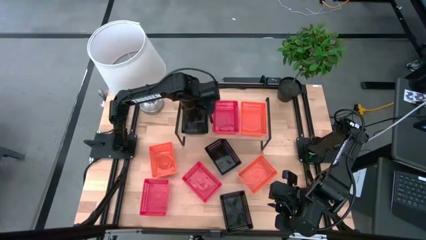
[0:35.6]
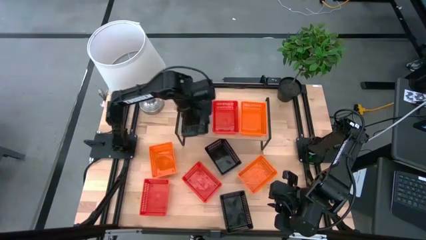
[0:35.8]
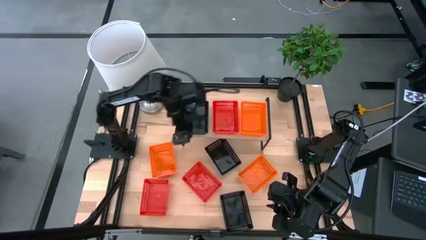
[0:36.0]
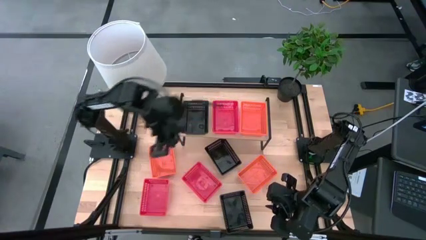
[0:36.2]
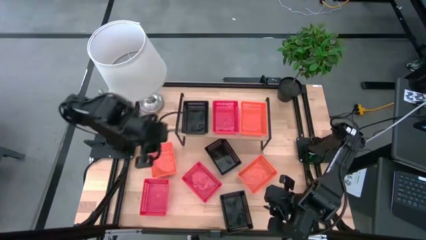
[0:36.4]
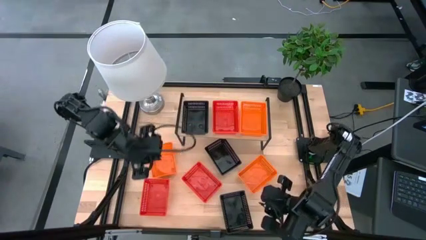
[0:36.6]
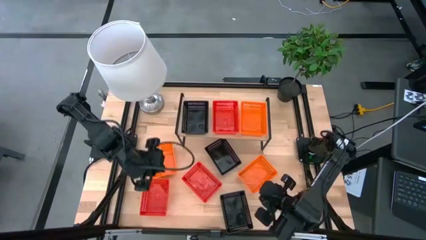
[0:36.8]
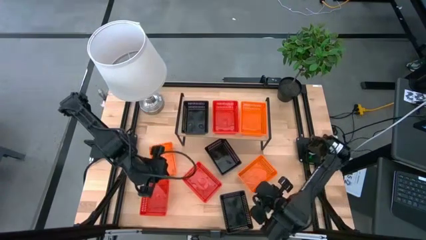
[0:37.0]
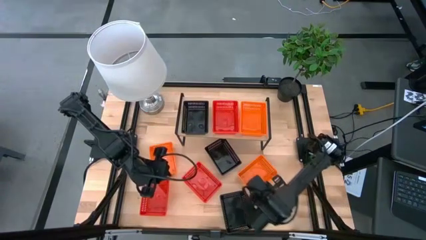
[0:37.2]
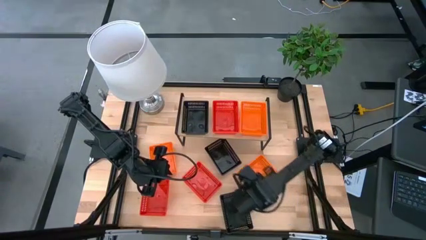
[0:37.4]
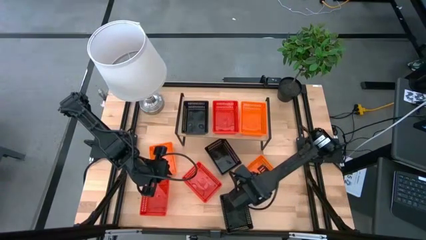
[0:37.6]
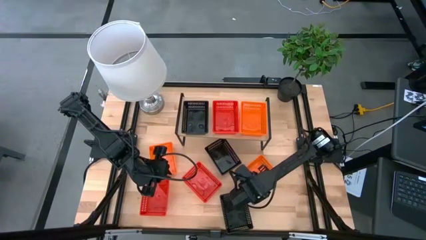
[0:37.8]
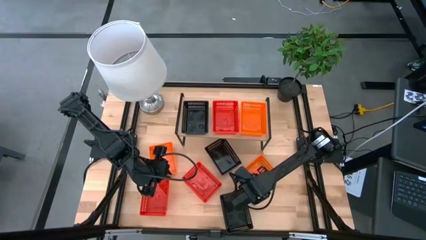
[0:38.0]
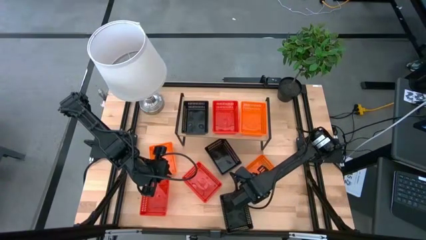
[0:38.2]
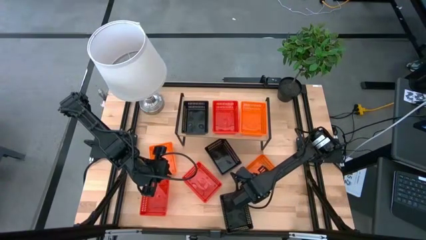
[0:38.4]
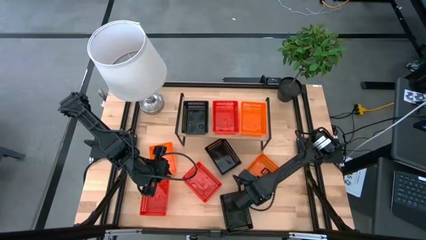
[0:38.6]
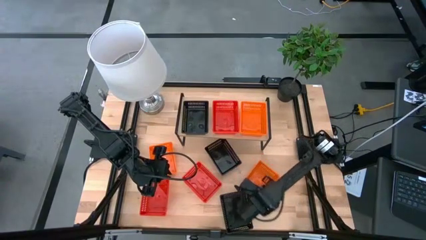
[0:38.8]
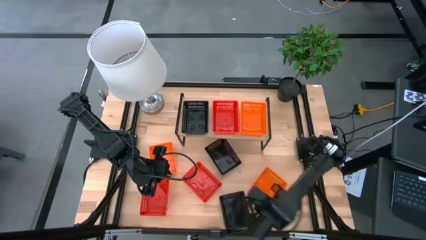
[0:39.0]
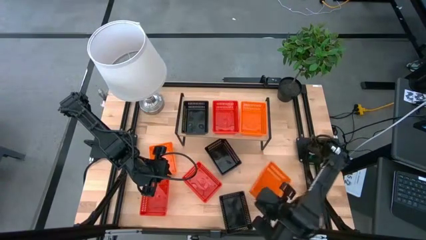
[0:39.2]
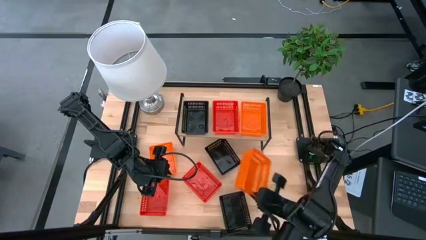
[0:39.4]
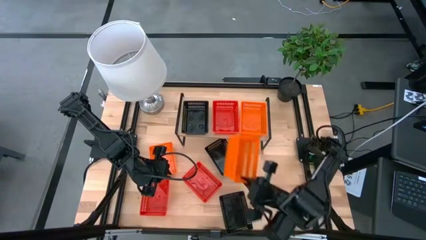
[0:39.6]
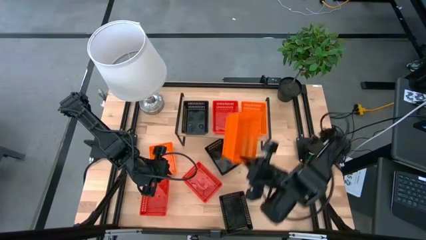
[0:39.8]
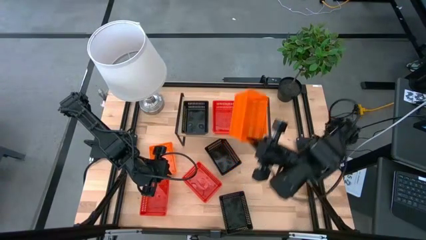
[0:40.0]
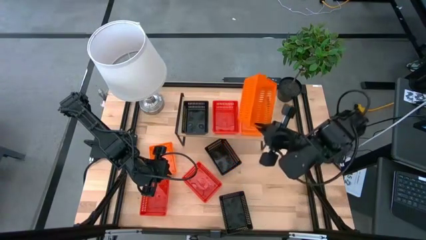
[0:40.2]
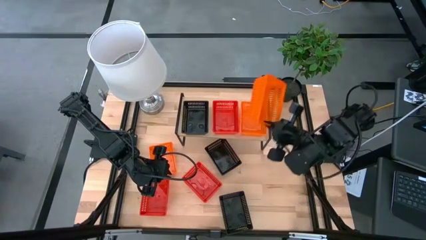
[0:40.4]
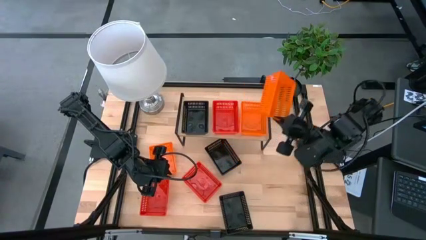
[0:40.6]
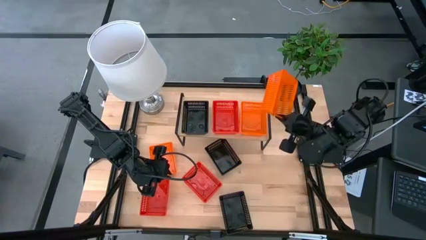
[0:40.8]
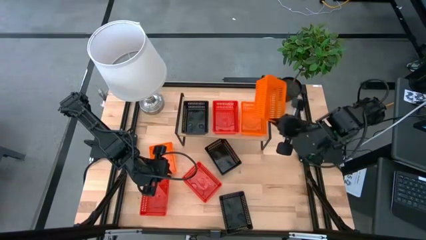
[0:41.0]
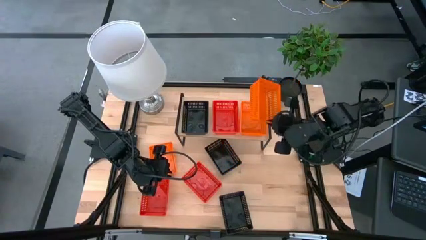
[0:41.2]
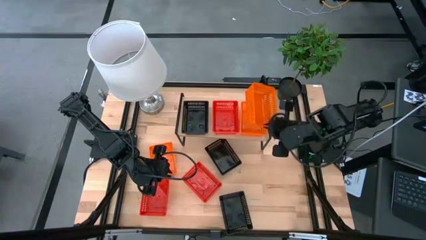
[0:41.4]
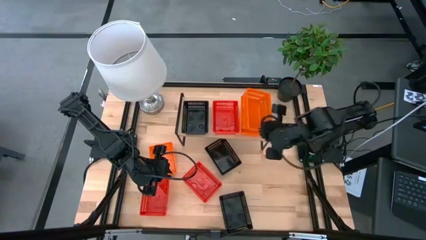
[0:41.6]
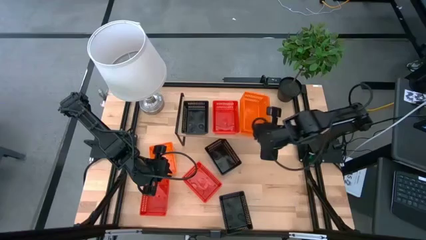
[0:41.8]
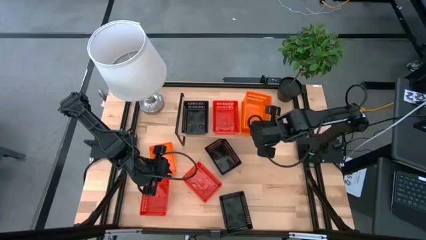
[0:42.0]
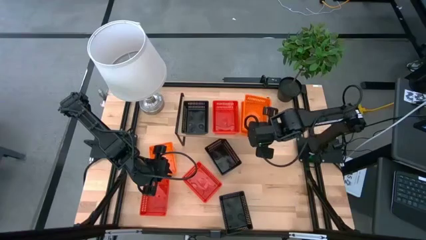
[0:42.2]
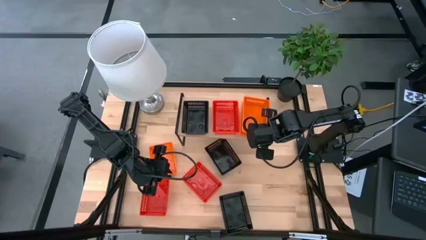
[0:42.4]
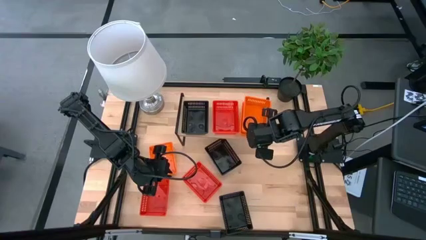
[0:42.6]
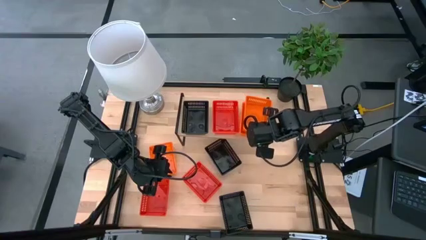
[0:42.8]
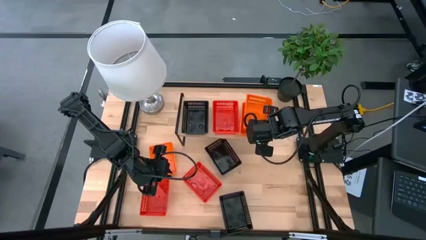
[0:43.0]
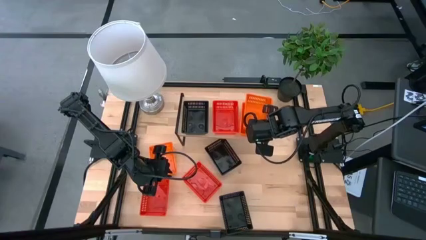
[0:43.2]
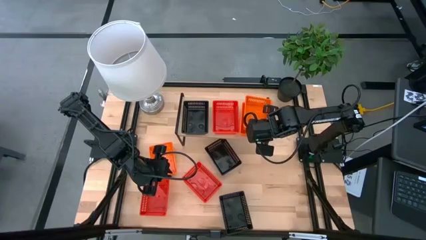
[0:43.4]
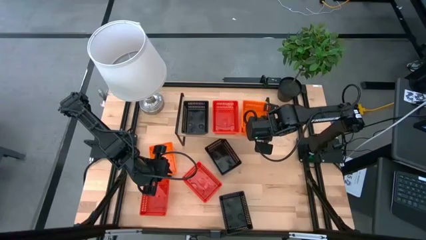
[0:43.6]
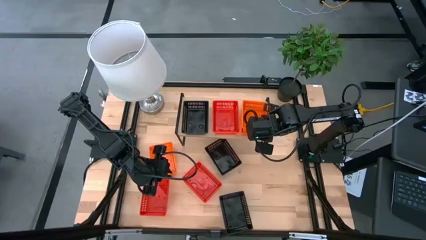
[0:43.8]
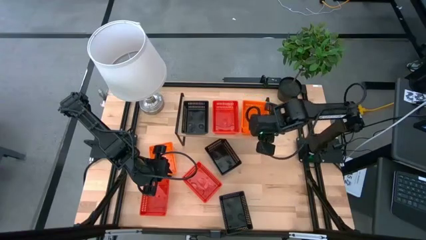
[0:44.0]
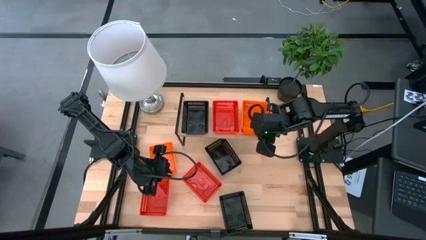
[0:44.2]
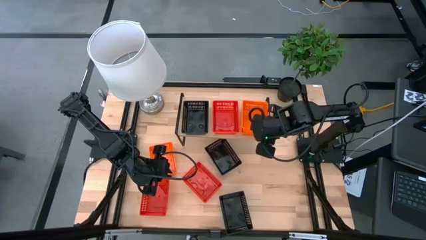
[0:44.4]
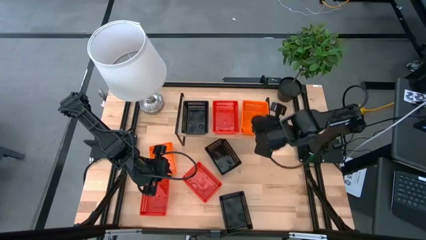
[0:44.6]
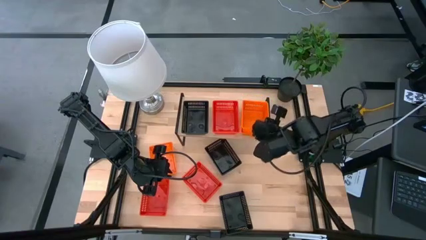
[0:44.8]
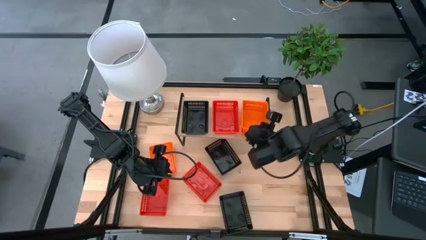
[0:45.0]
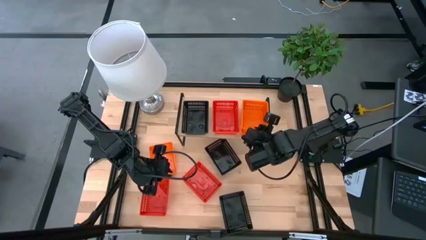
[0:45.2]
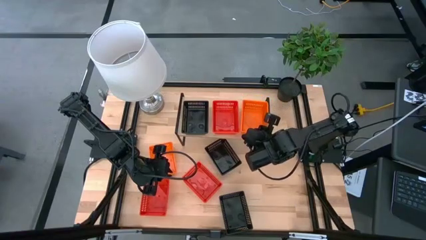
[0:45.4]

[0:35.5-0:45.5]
Task: Stack baskets on shelf by color
Stack the right orange bin on top of the orange bin on the shelf

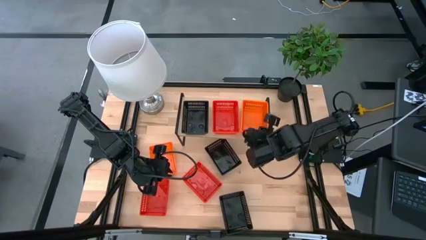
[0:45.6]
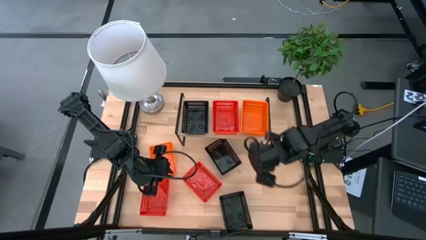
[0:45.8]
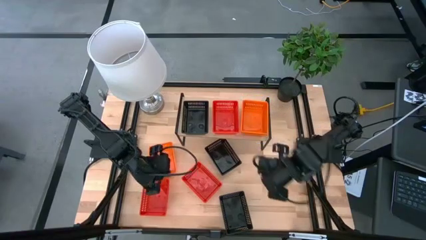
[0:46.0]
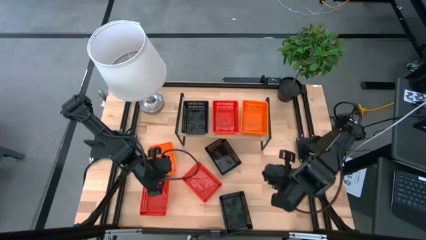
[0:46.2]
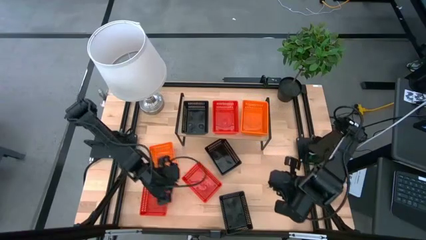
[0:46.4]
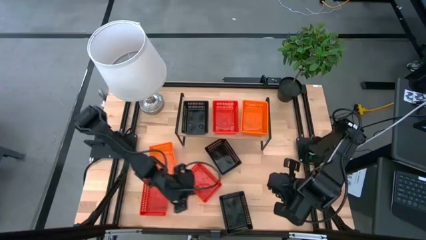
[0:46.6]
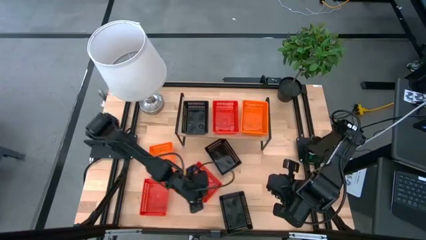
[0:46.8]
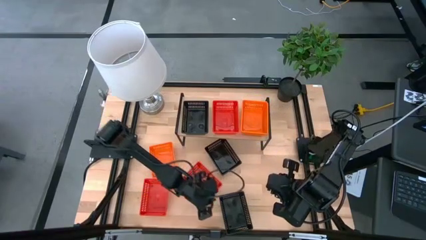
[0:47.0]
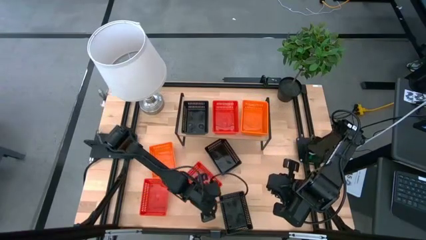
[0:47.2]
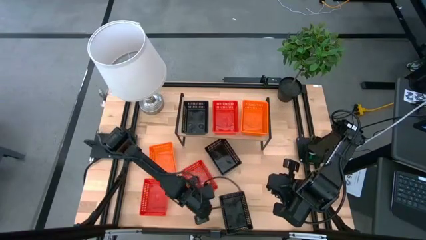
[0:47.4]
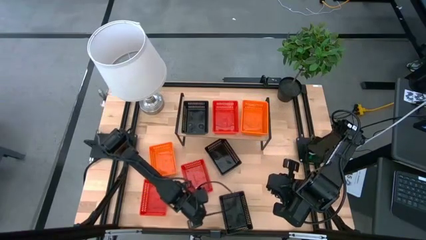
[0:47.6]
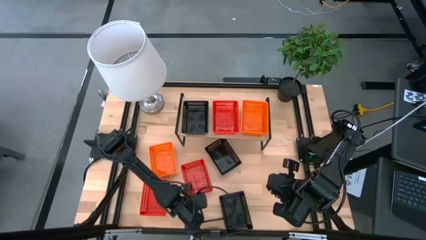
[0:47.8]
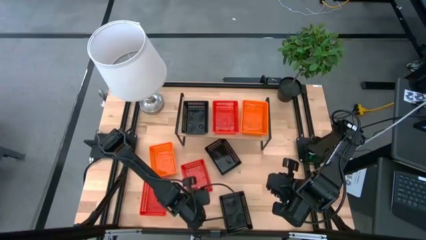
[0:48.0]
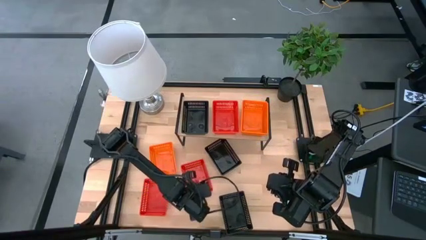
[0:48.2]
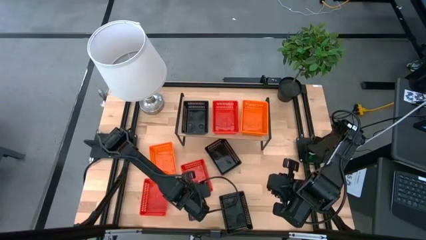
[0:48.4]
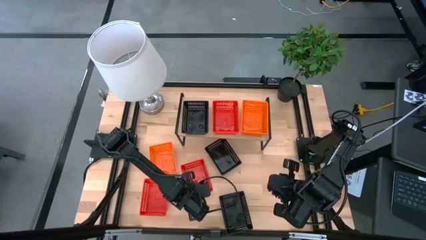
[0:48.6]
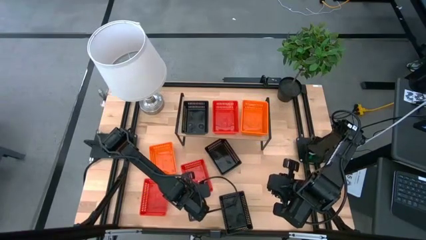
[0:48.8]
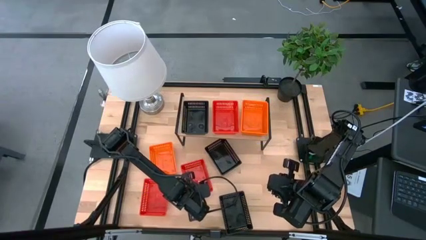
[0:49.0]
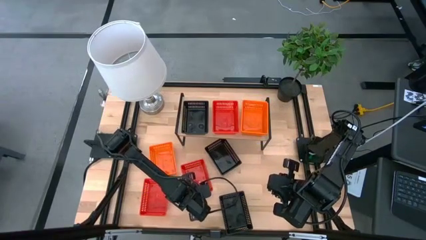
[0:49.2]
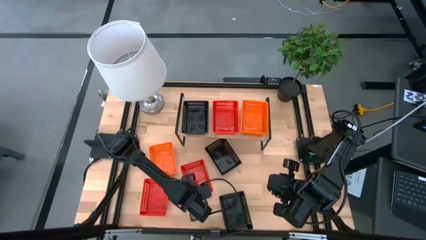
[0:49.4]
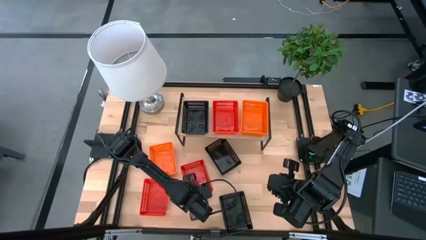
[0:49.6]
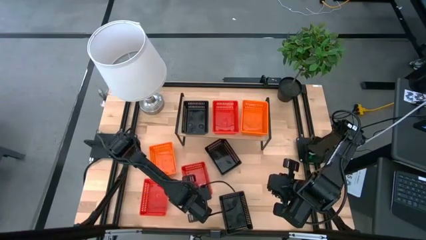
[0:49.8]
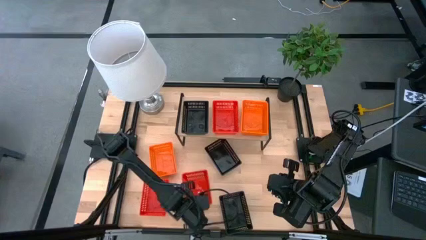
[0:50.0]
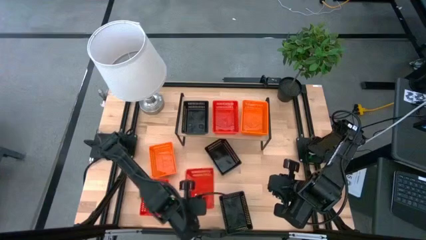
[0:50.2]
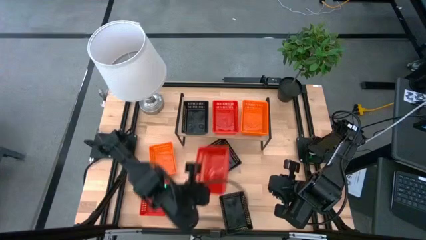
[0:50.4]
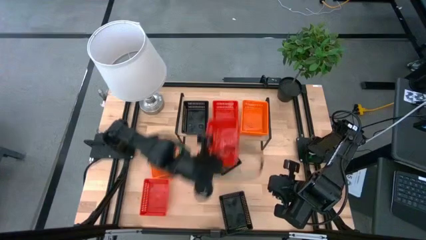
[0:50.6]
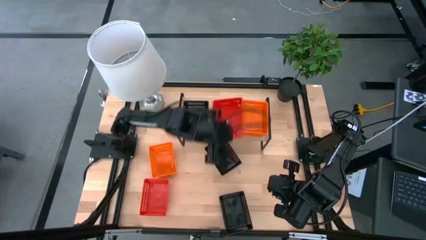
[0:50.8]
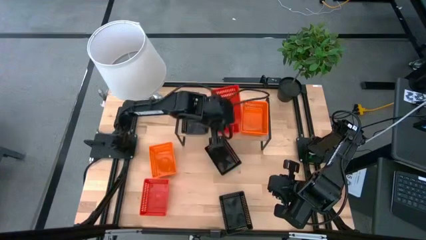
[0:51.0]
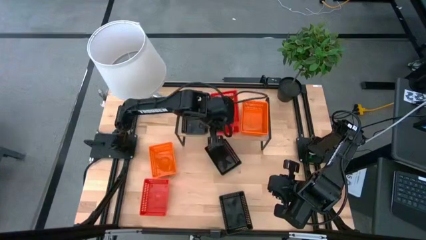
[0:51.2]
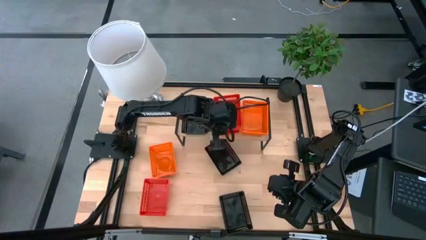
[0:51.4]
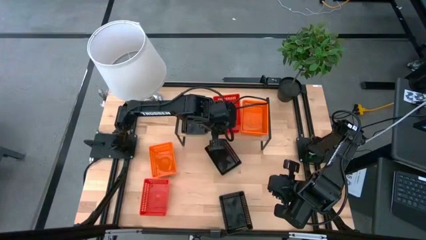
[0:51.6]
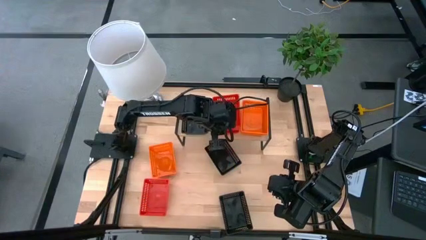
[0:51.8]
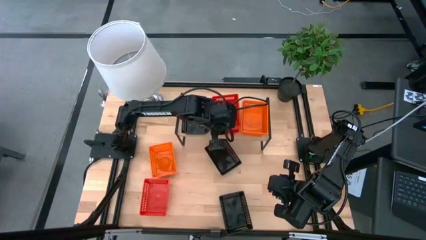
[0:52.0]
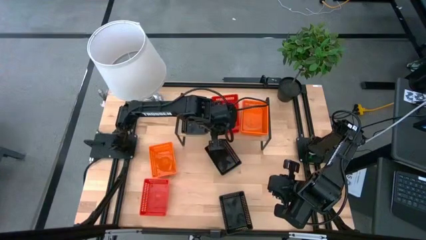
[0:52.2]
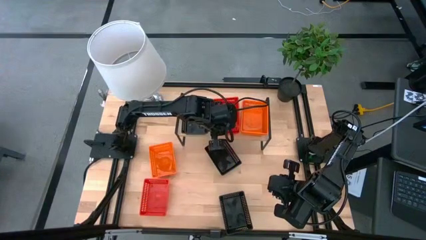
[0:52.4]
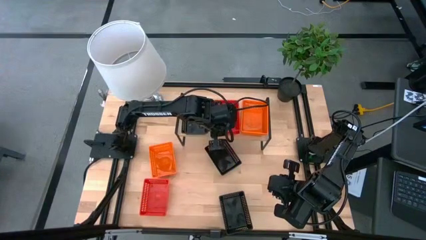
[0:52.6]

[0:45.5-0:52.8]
Stack the right red bin on top of the red bin on the shelf
